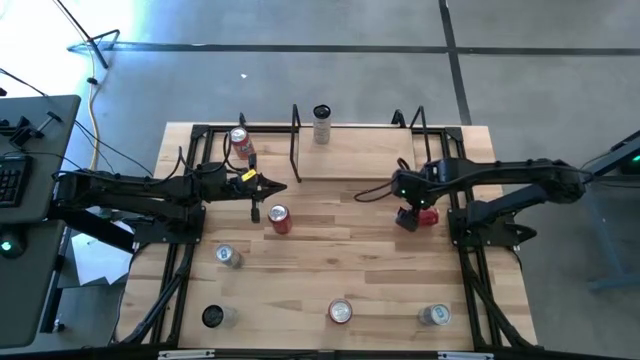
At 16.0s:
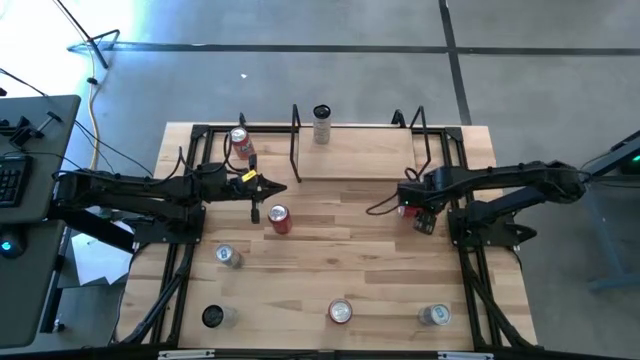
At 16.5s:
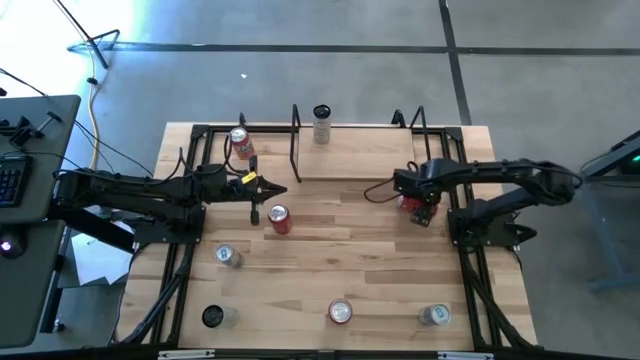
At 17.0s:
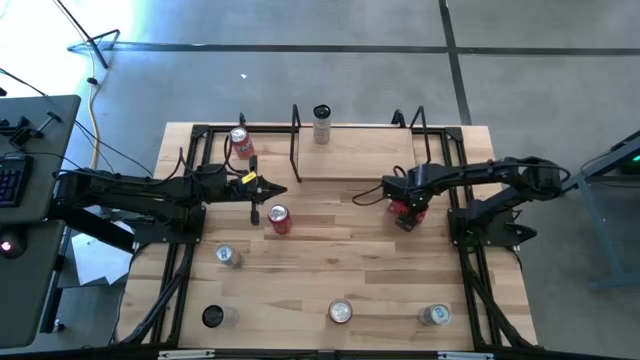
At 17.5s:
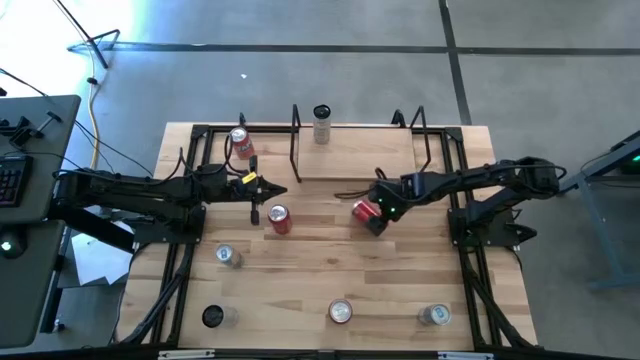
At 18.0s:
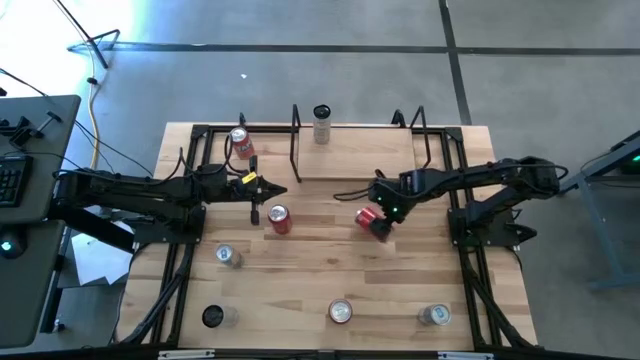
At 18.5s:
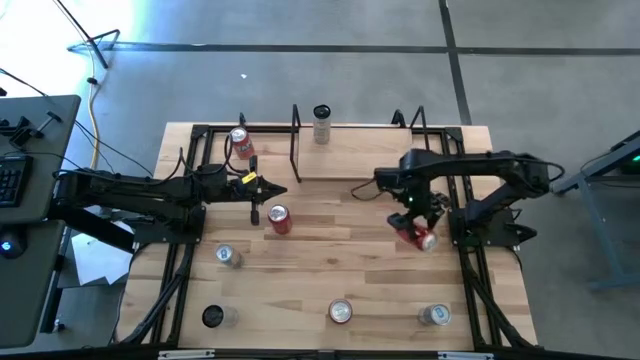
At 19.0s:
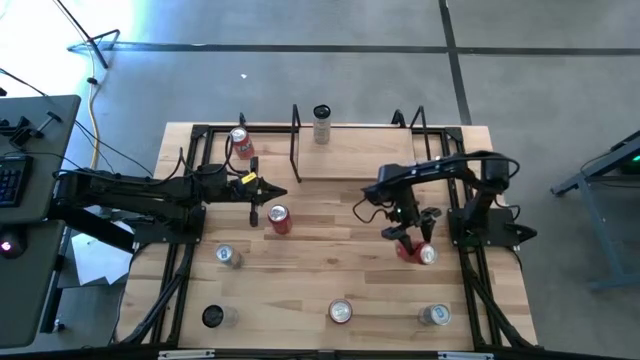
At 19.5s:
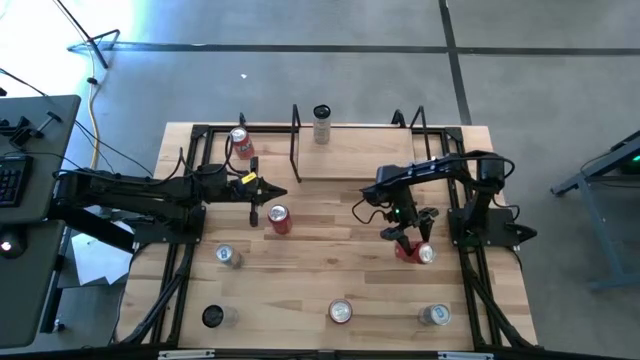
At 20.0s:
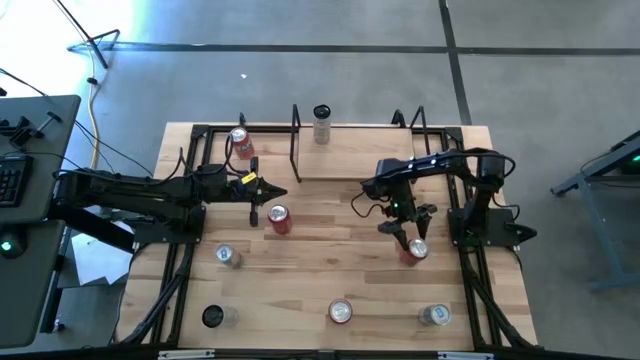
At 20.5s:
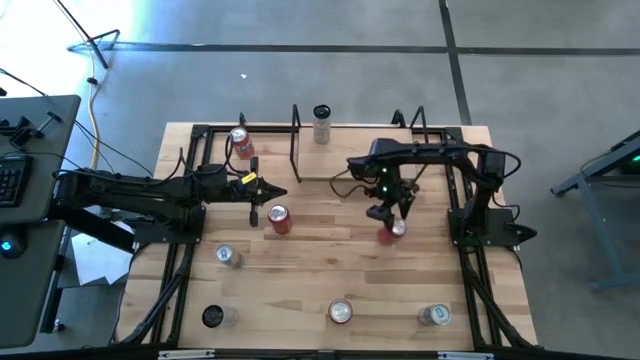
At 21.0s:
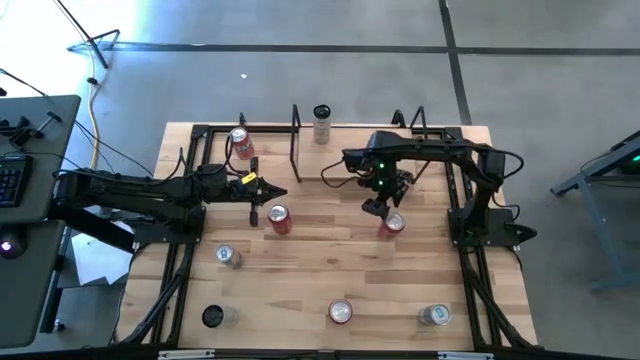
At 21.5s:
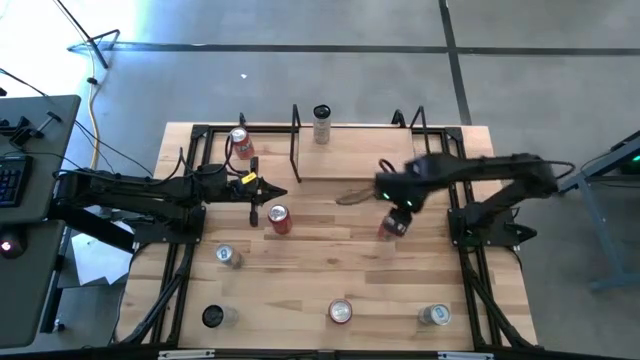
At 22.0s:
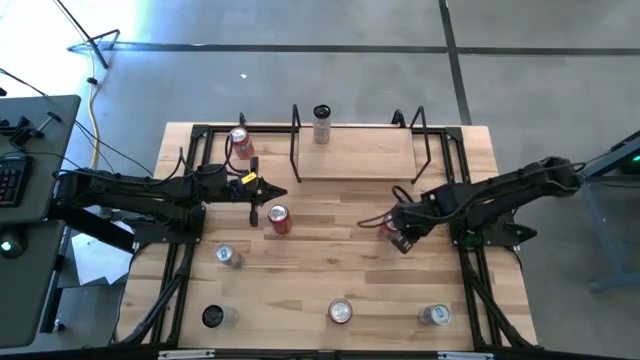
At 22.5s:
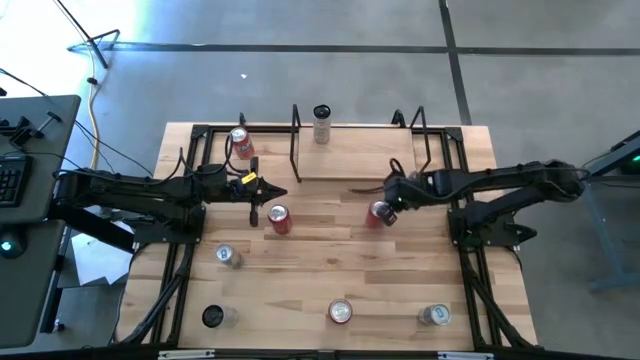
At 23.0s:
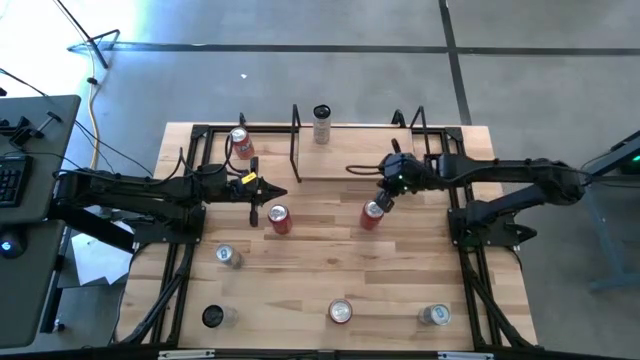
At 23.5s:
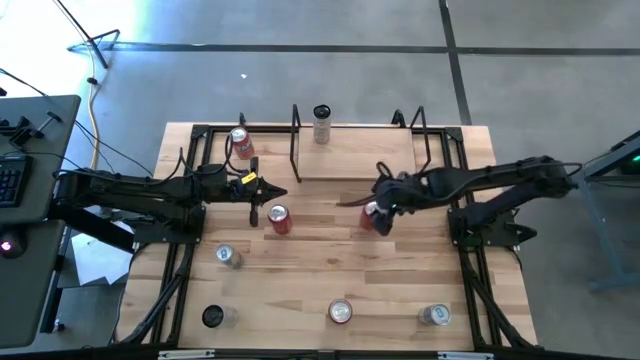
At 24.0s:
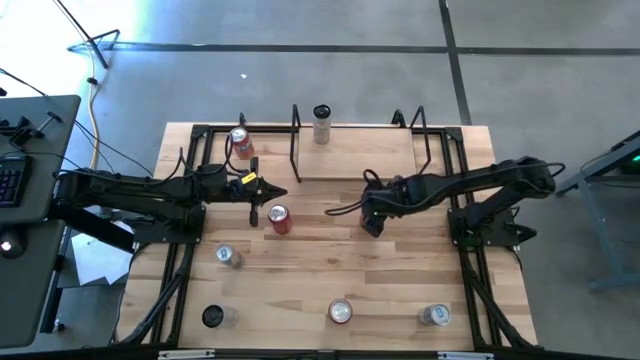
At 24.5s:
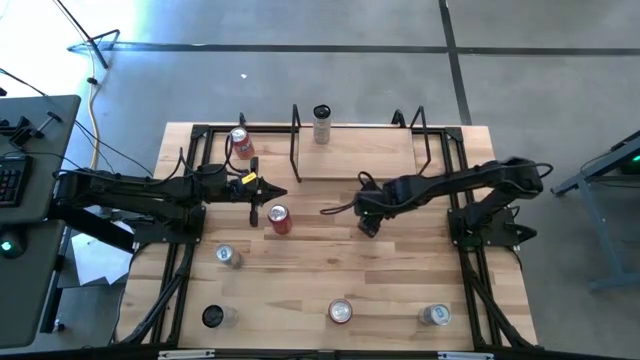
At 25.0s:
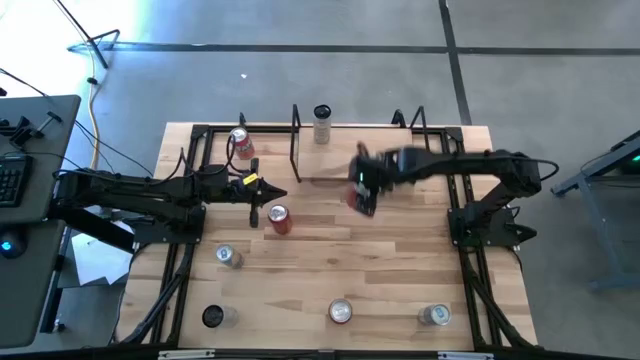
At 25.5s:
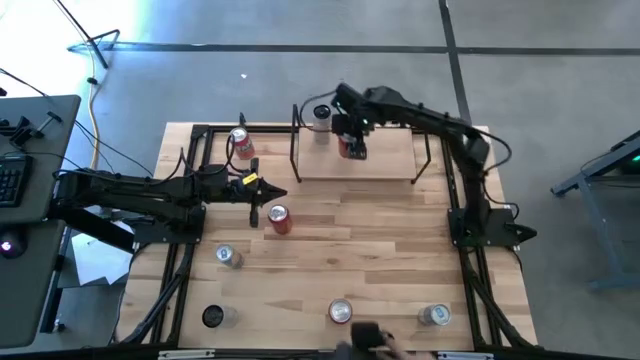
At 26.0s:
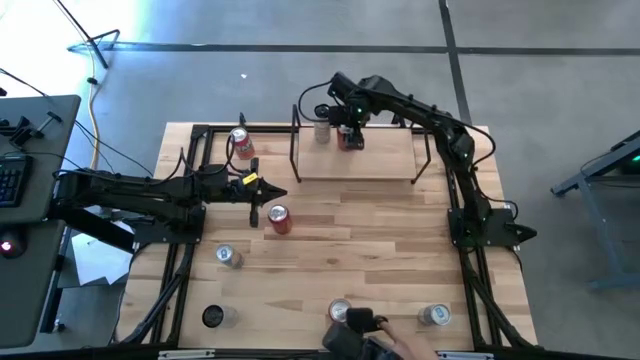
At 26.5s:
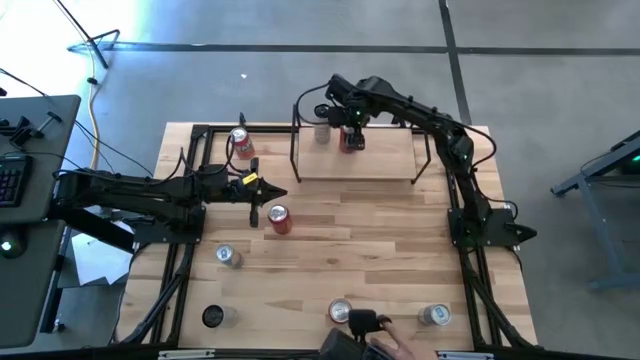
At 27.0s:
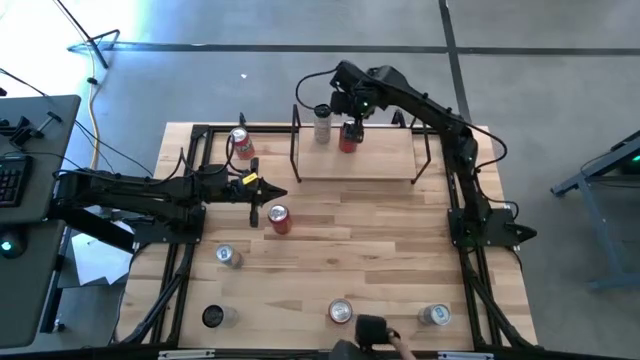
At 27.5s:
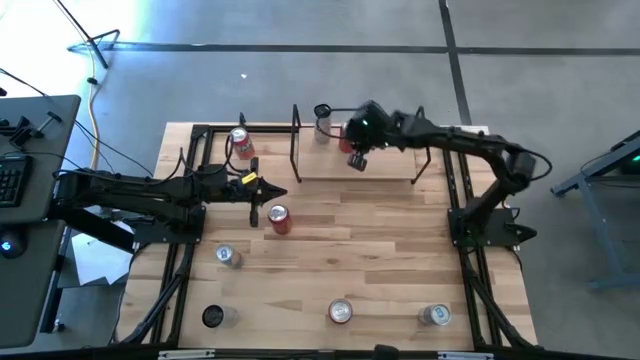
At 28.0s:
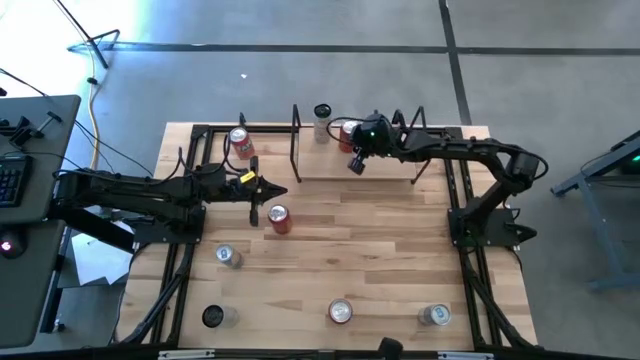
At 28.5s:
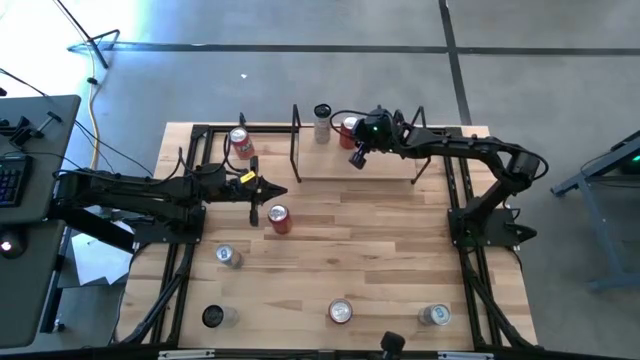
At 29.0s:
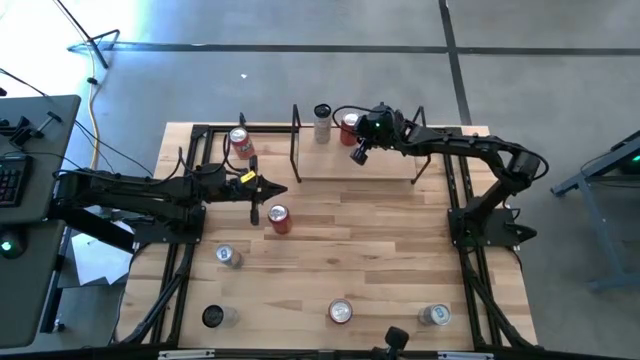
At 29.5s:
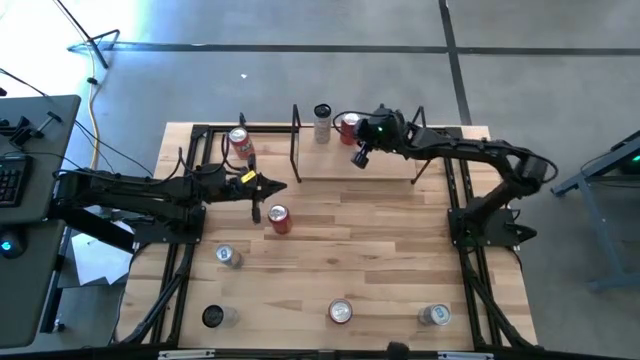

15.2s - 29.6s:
Task: Place canned beverage on shelf
Put the right red soda can on the shelf

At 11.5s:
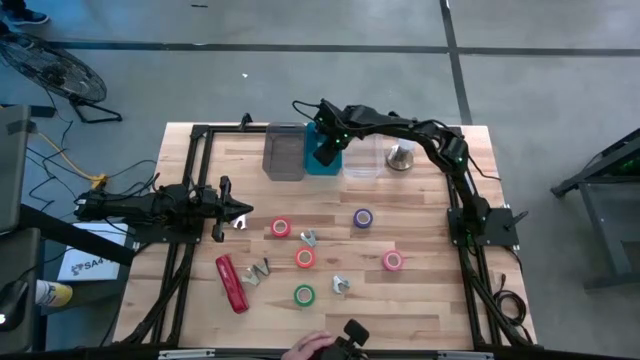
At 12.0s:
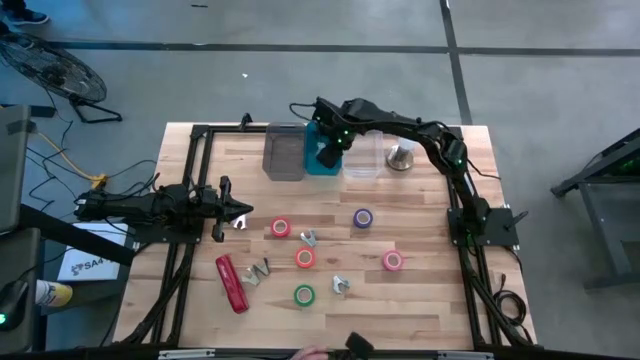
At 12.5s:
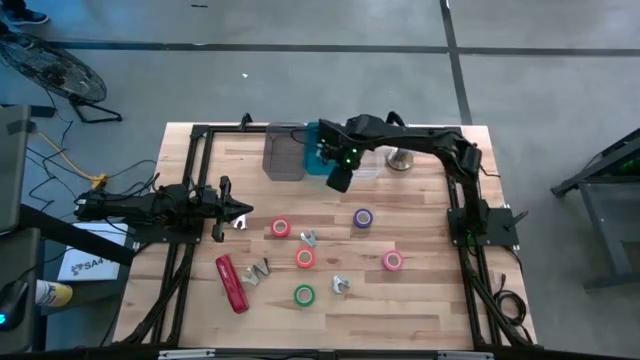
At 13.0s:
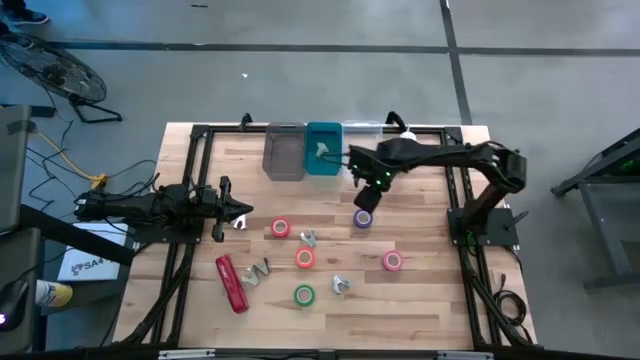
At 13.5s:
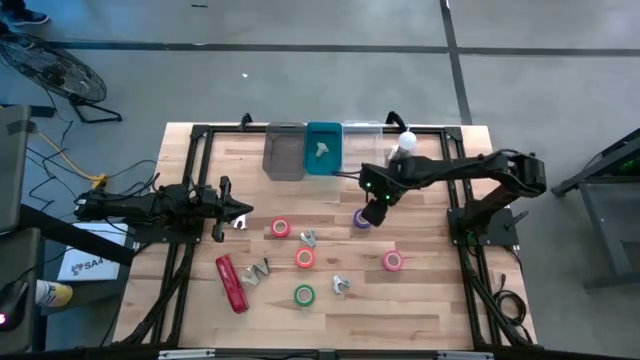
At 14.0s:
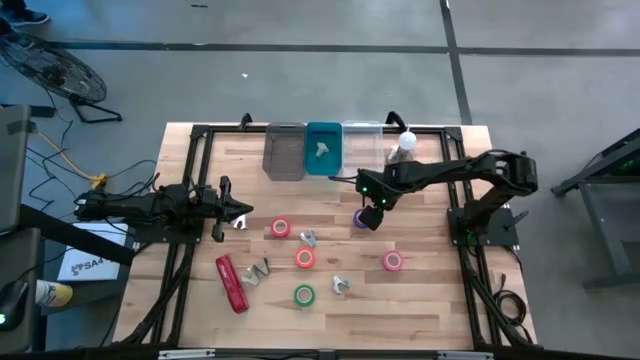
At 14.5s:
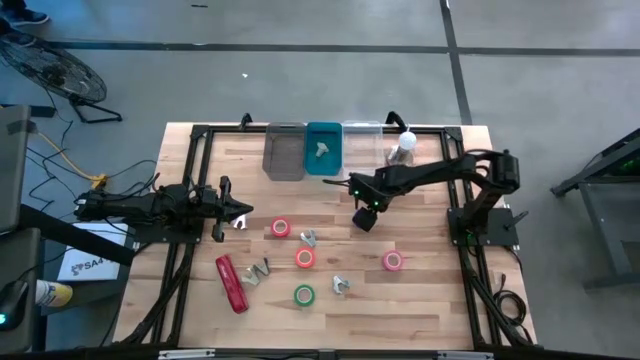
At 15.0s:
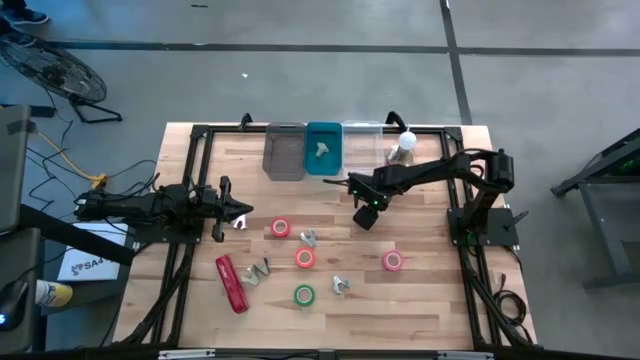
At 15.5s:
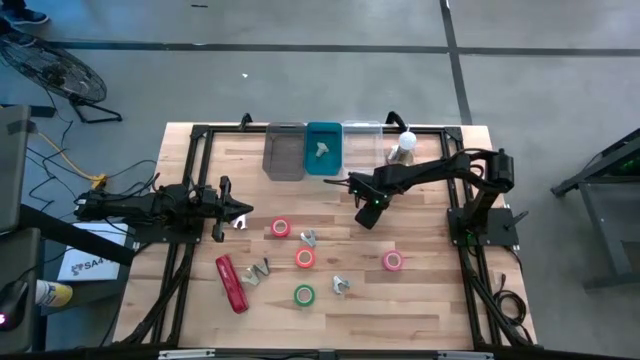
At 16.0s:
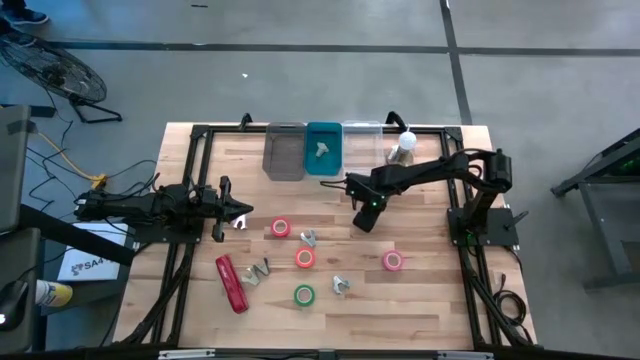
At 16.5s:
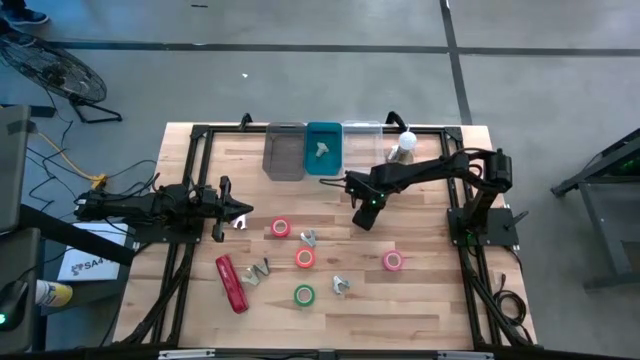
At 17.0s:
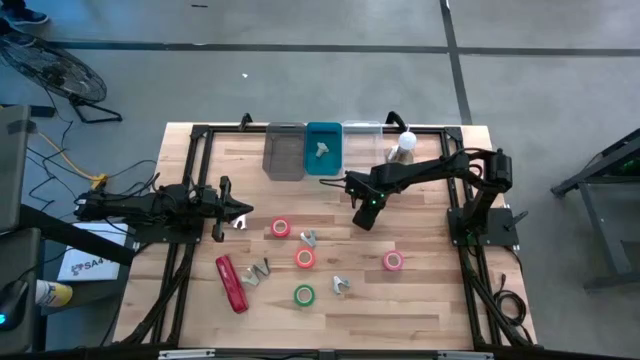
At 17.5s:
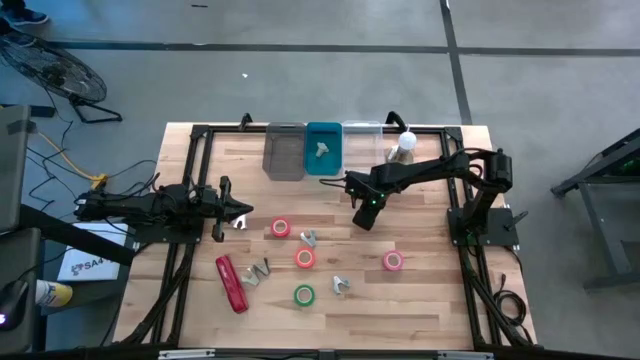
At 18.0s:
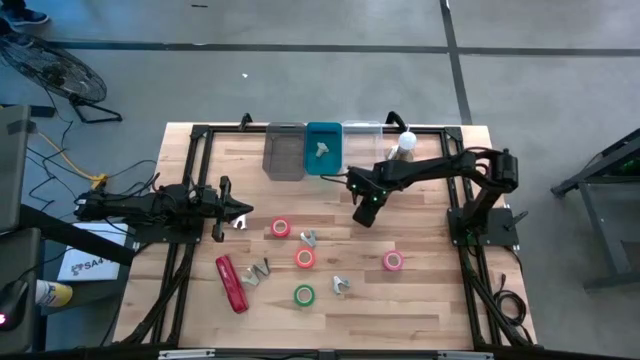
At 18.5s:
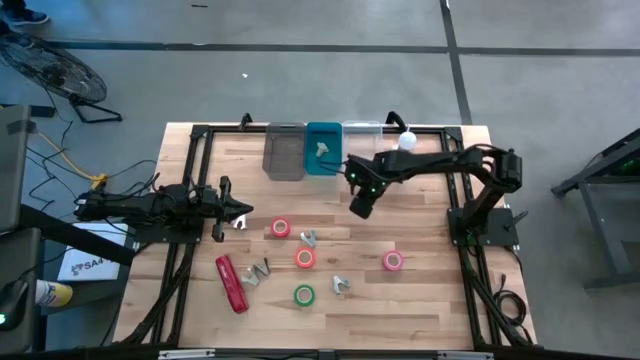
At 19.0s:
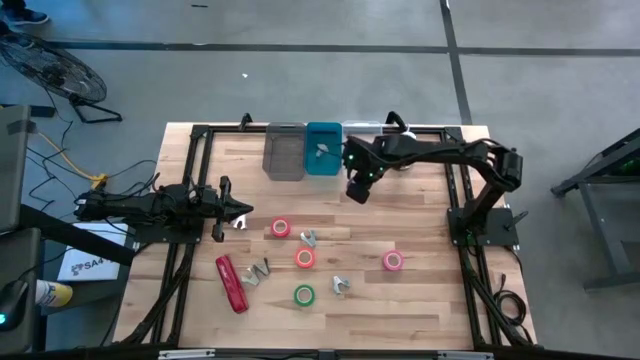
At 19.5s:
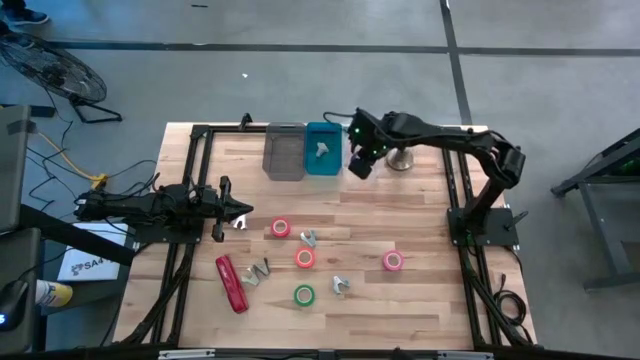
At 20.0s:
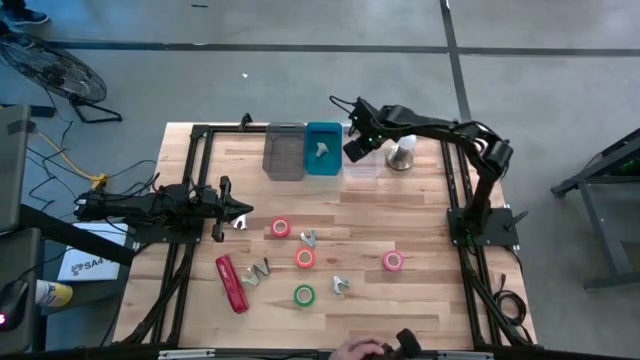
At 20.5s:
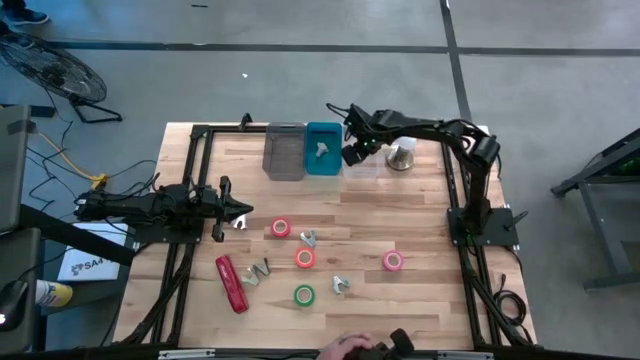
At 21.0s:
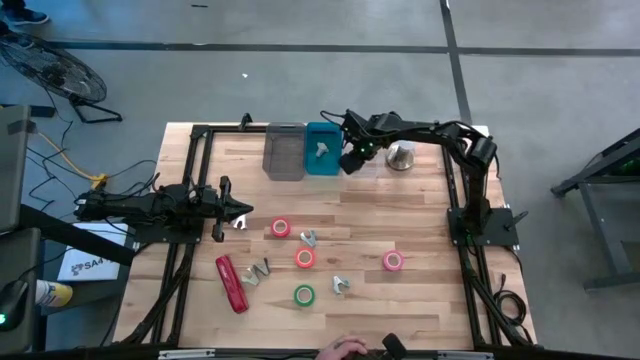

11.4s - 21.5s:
Task: Pick and place Stapler, Stapler remover, tape
Put the blue tape into the transparent bin
